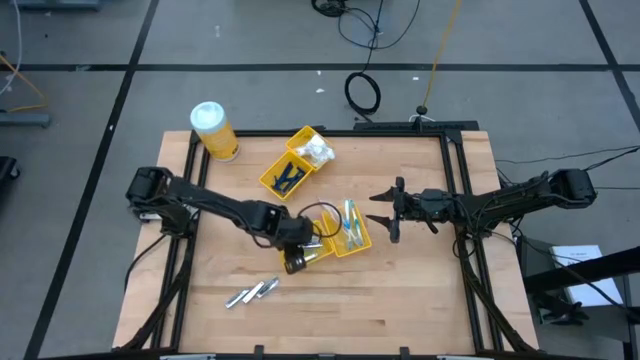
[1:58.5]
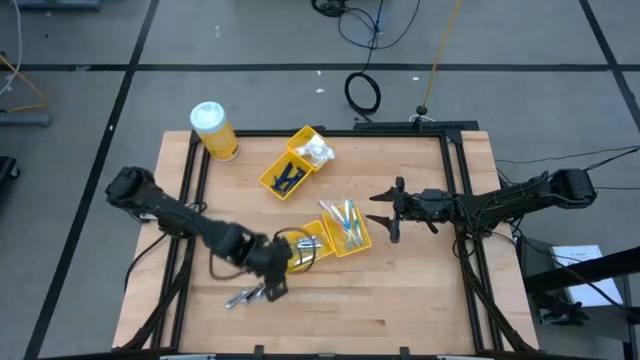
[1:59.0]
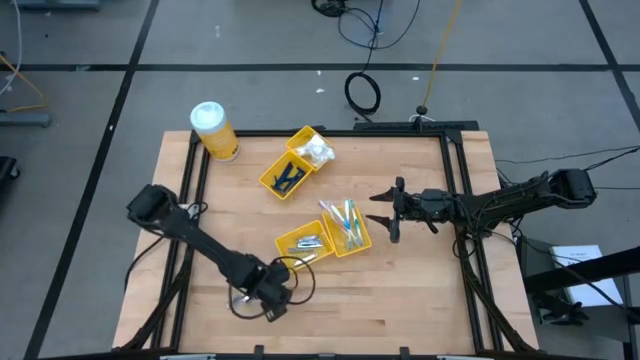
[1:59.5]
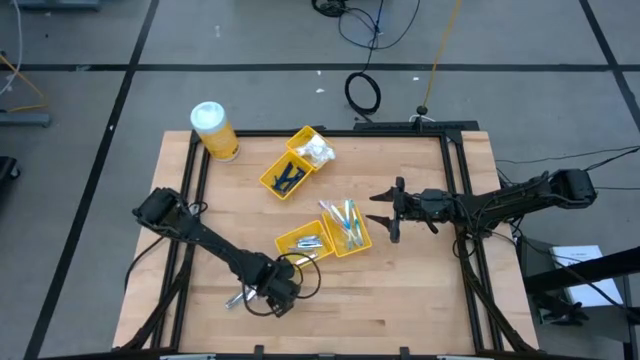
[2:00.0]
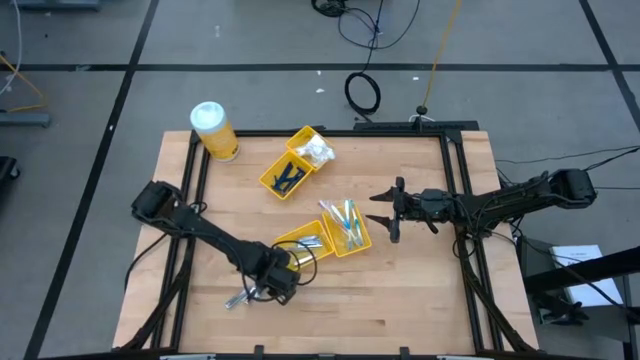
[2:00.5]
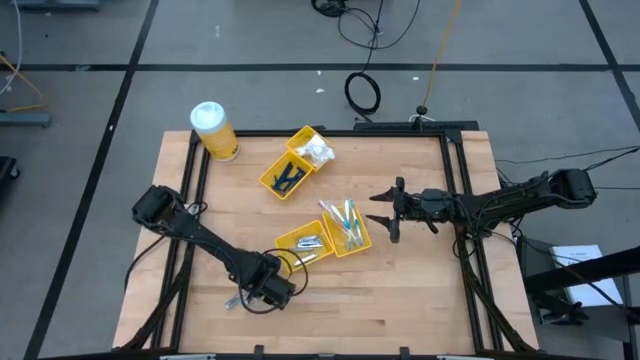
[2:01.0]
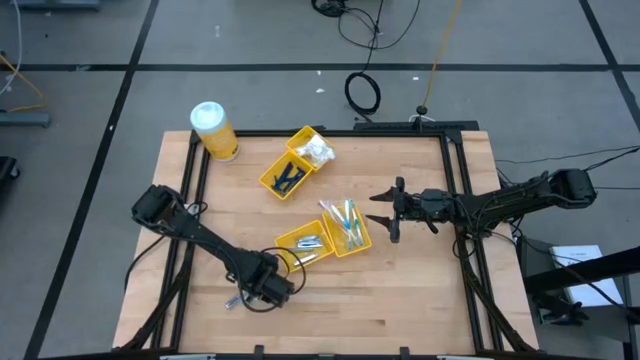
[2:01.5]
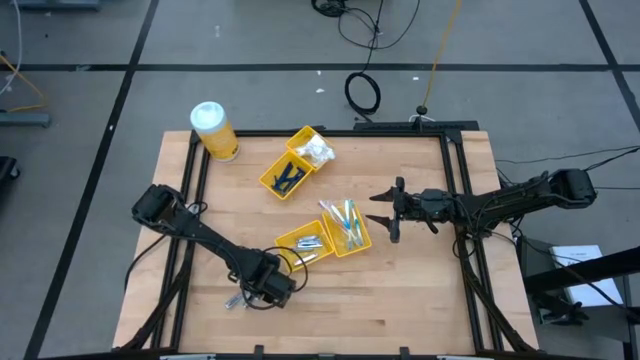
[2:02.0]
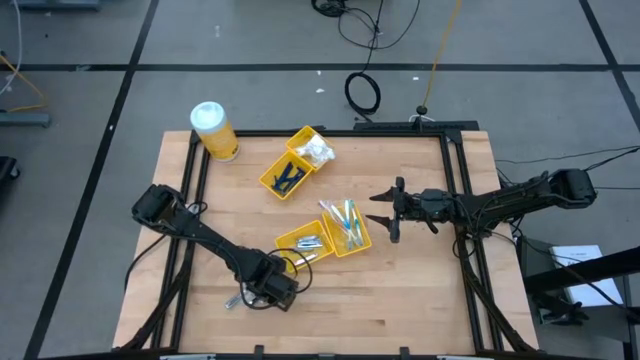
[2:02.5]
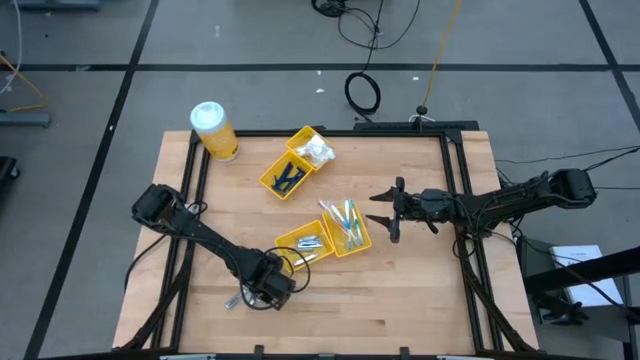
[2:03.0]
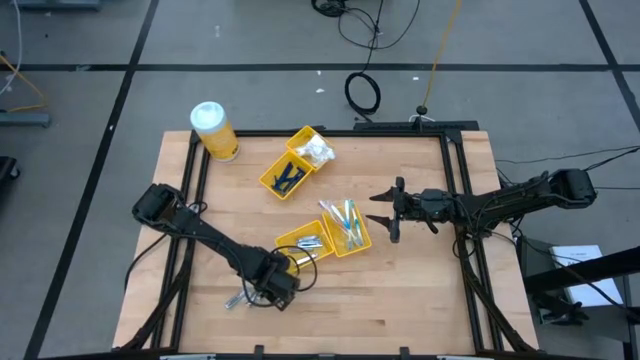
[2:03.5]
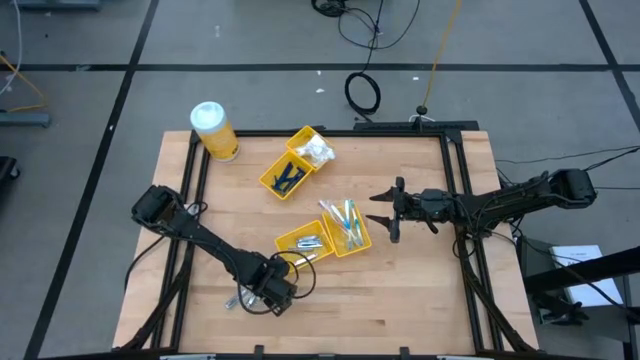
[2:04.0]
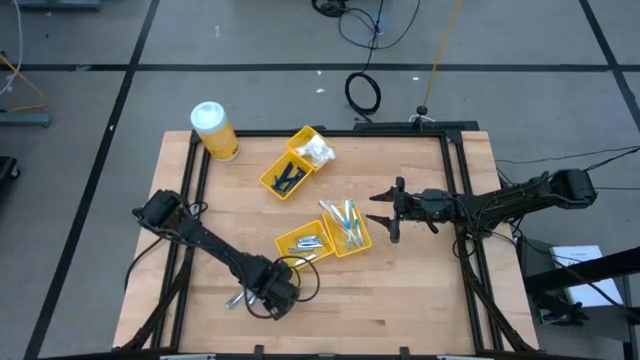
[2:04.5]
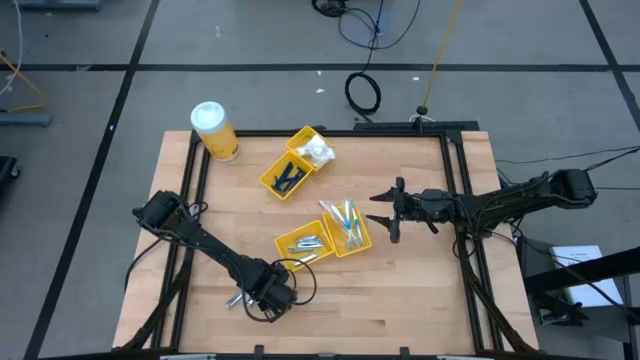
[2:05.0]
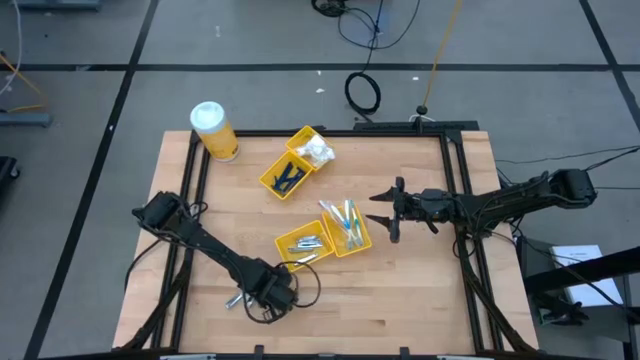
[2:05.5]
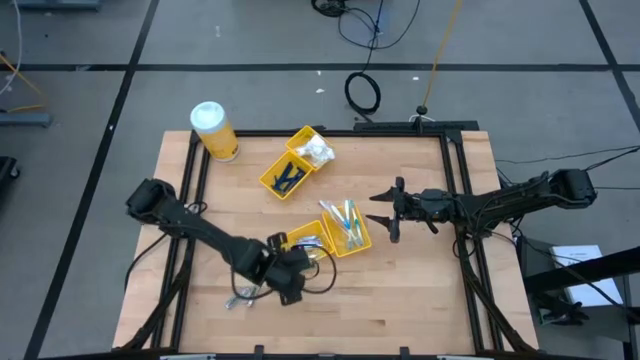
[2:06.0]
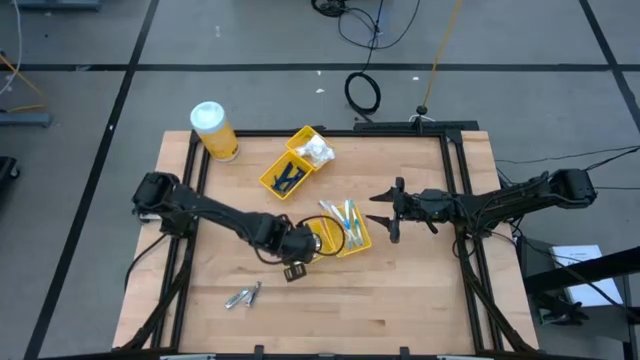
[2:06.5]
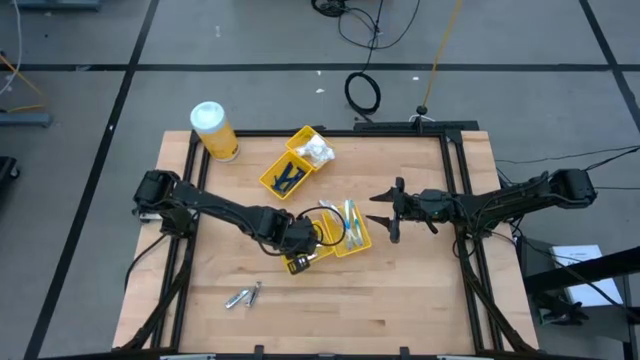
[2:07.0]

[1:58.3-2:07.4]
Task: Pick & Place Travel size toiletries
Put the silver nail cutter into the bottom left yellow basket

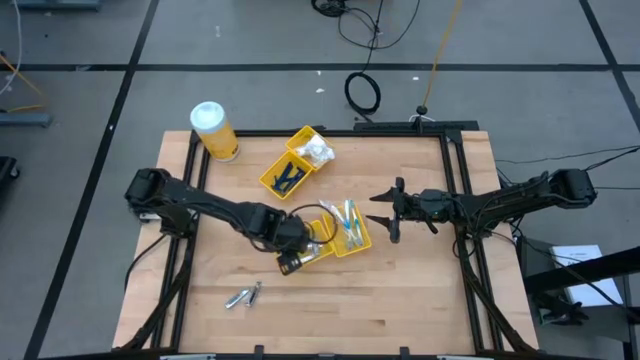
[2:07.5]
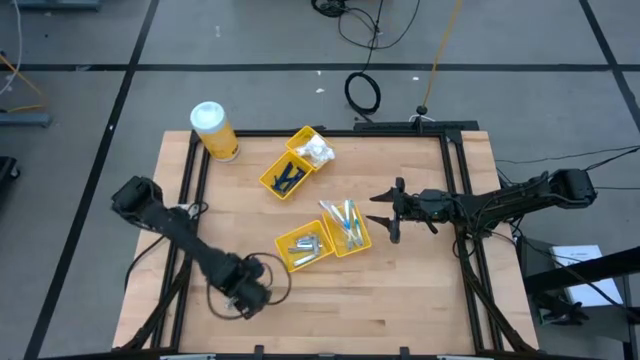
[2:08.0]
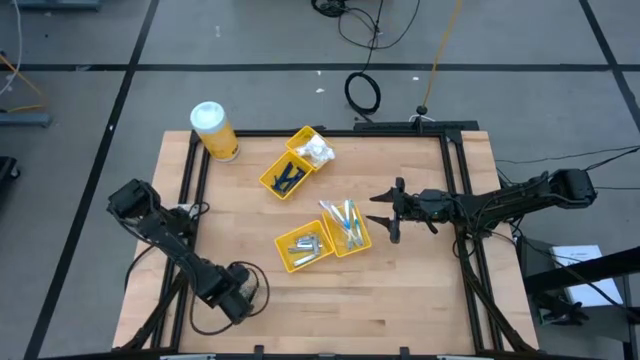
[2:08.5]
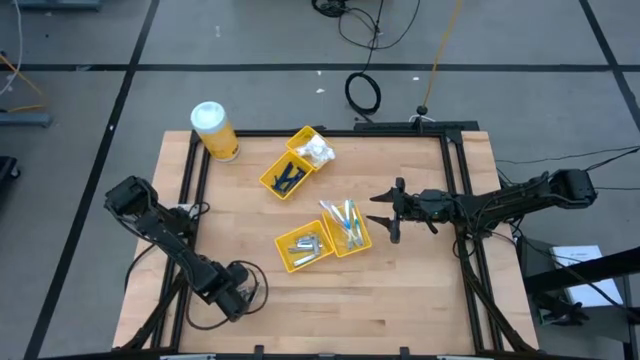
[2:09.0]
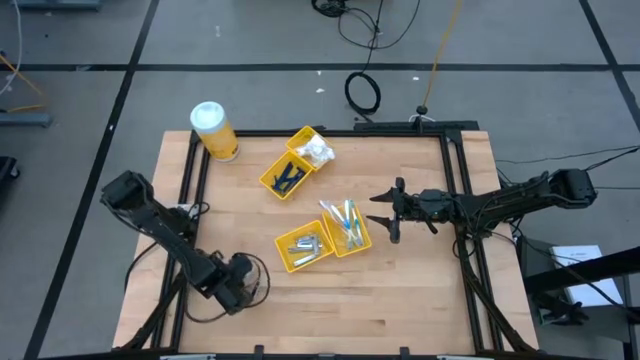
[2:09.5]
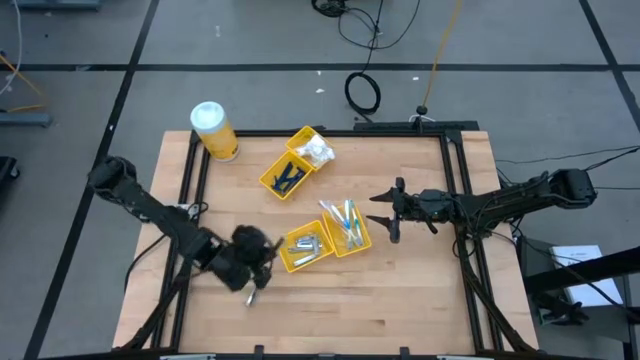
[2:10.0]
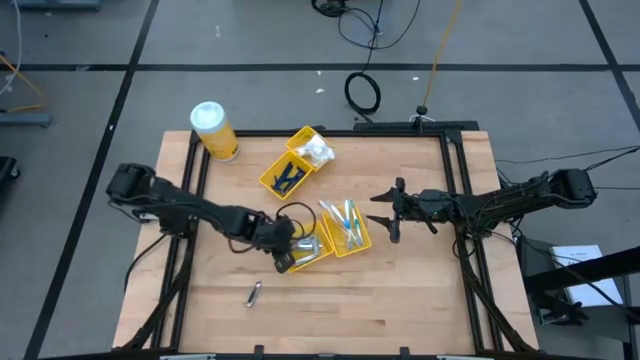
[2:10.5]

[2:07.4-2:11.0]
Put the silver nail cutter into the bottom left yellow basket

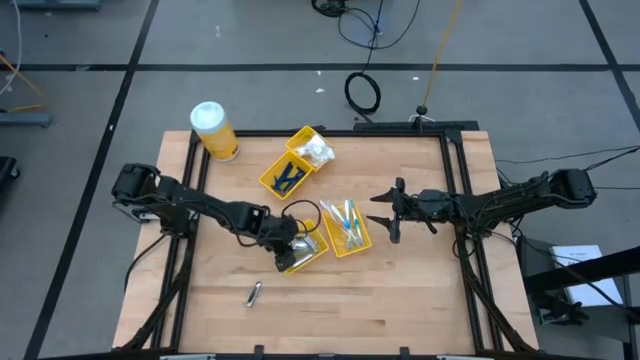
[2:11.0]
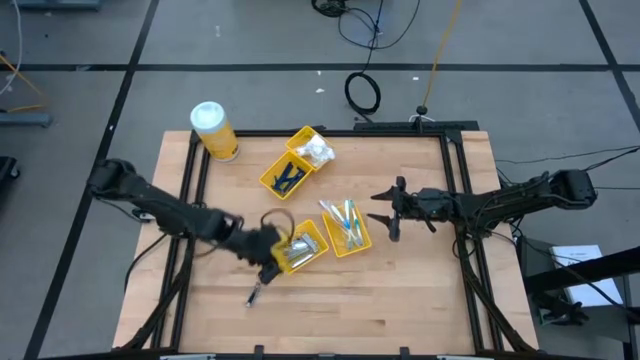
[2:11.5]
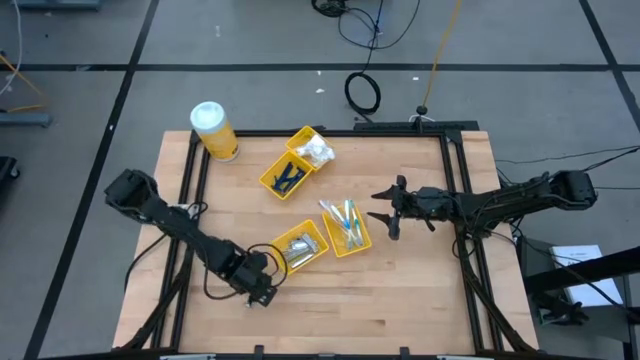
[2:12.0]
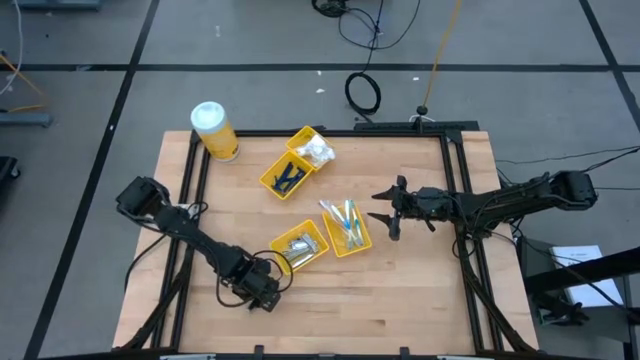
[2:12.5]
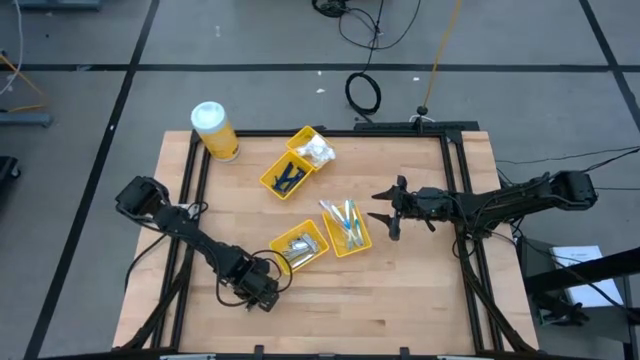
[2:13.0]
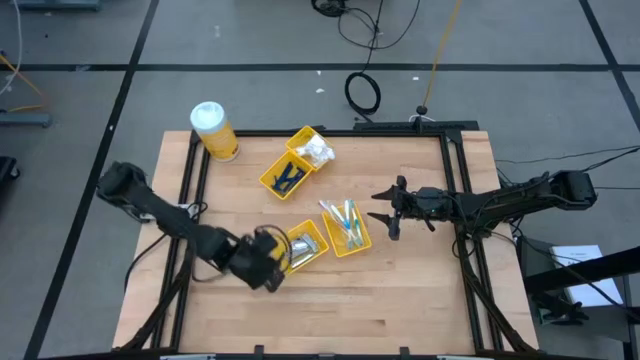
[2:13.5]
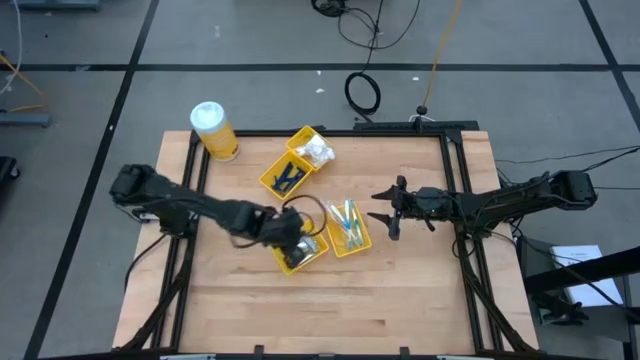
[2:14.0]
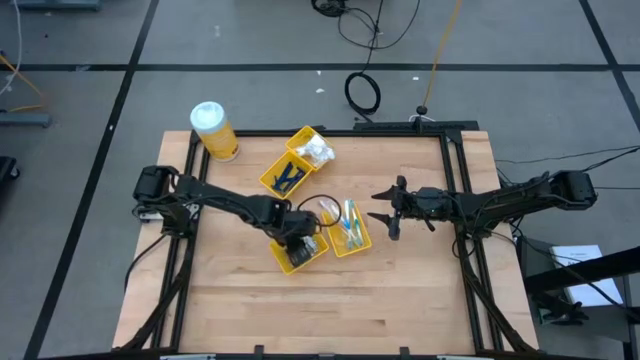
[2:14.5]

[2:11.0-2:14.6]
Put the silver nail cutter into the bottom left yellow basket

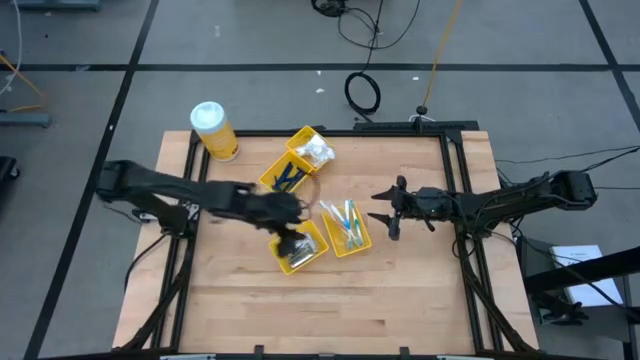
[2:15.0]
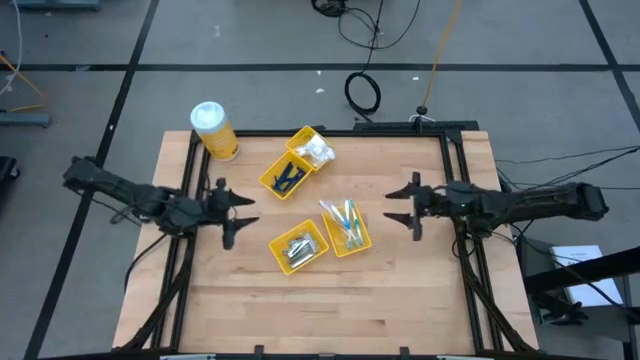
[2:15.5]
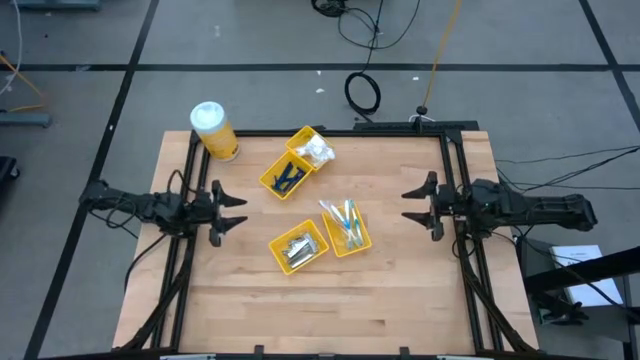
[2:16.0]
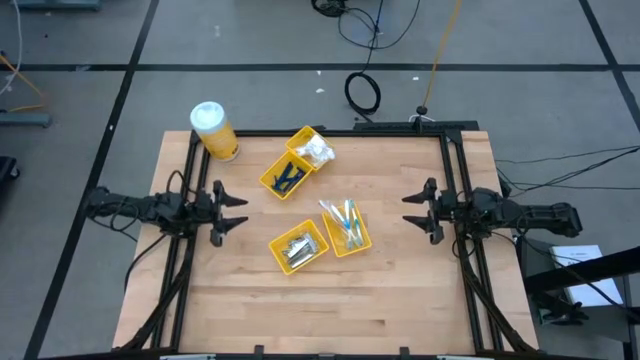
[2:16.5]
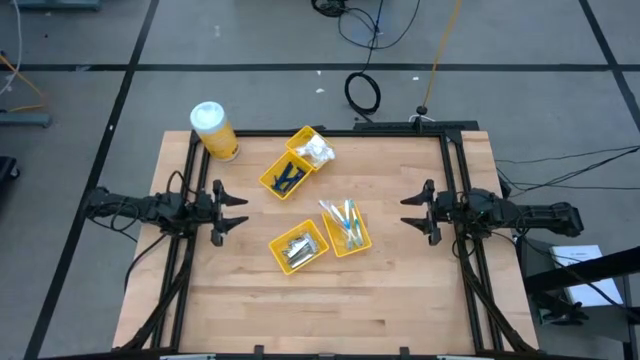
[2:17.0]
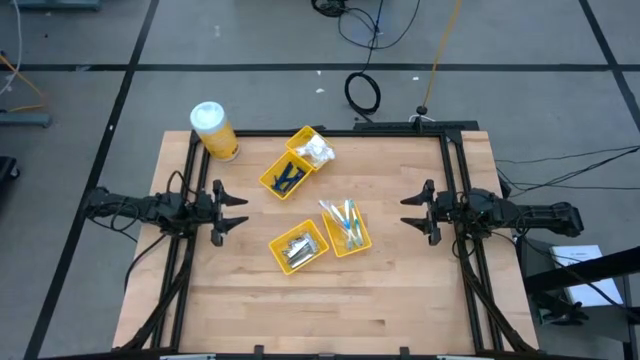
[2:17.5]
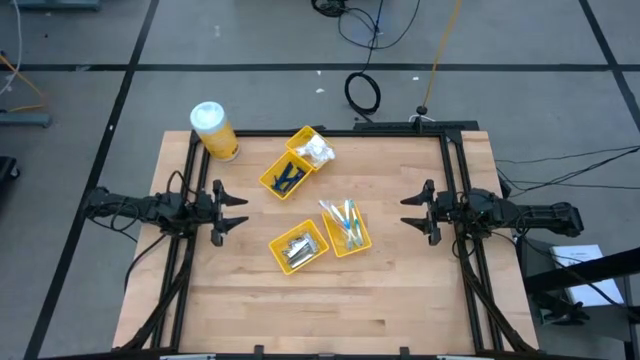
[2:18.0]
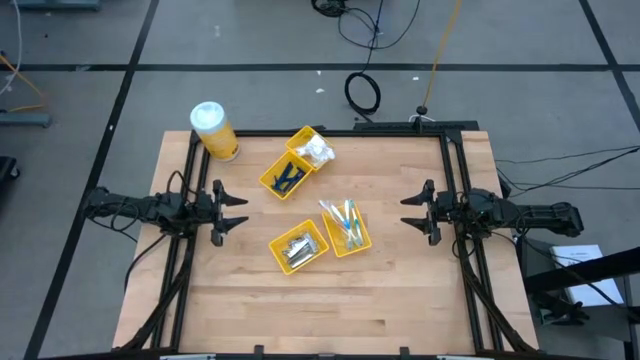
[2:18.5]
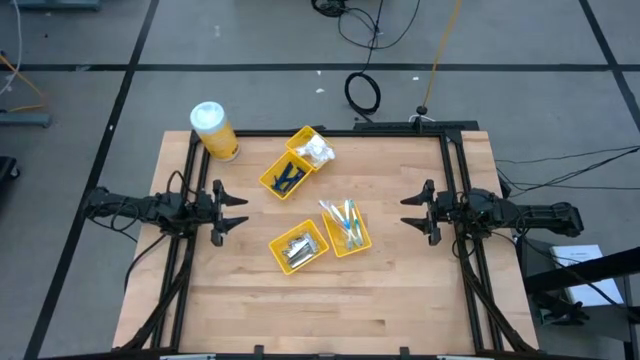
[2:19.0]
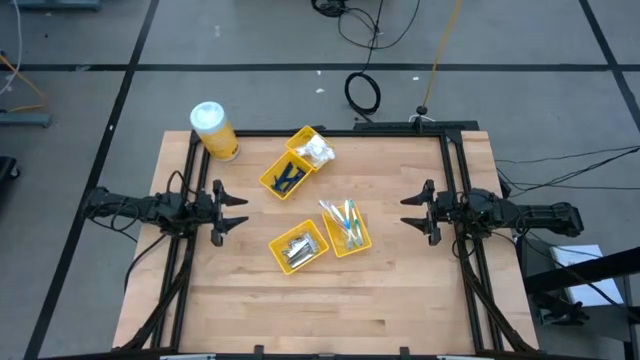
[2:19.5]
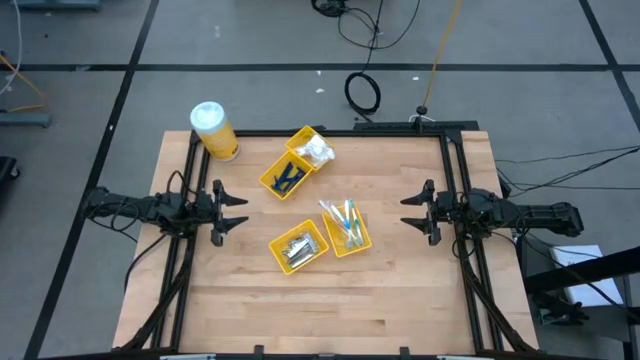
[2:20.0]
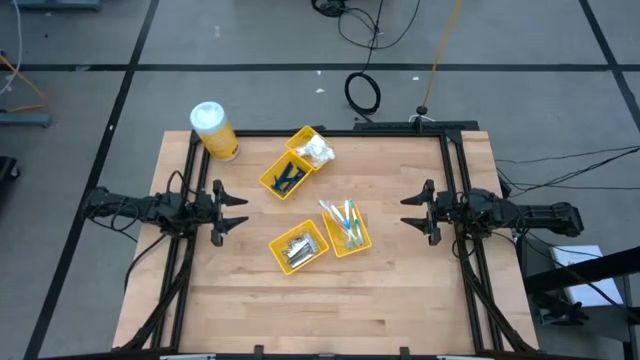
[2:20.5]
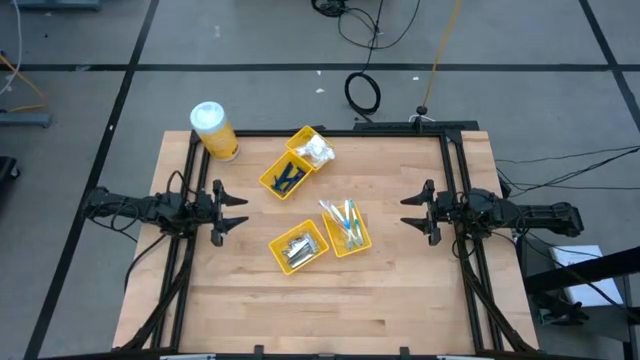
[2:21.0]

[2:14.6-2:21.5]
Return to Home Position
